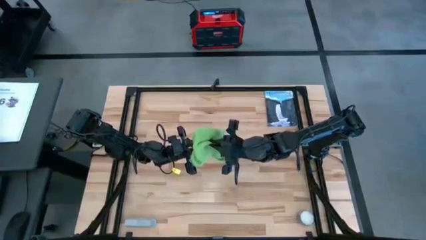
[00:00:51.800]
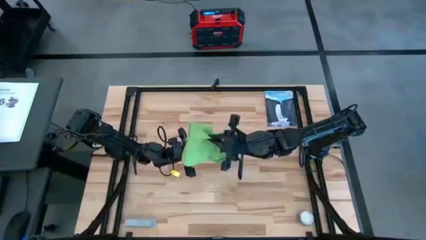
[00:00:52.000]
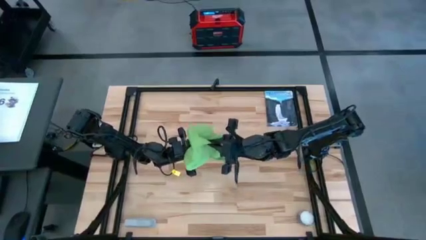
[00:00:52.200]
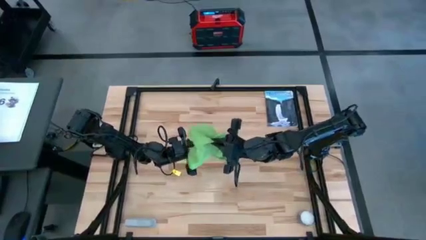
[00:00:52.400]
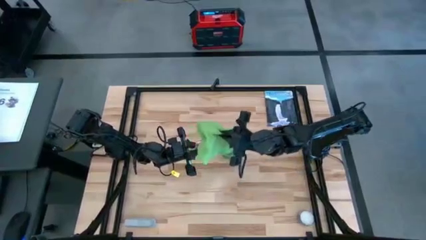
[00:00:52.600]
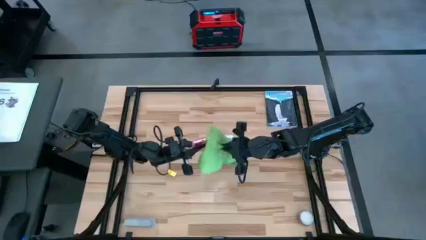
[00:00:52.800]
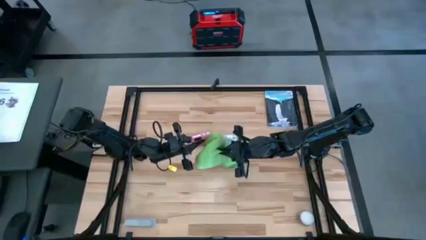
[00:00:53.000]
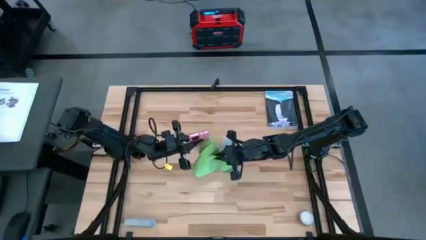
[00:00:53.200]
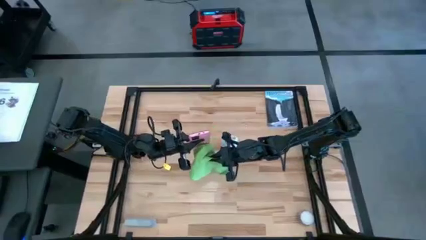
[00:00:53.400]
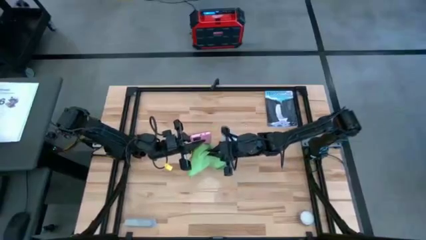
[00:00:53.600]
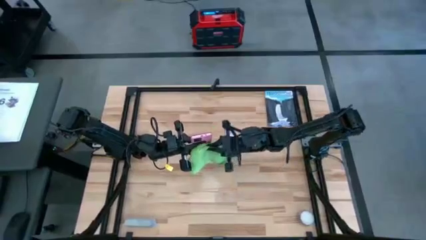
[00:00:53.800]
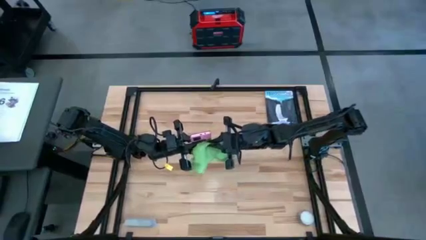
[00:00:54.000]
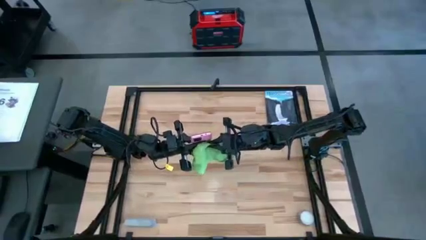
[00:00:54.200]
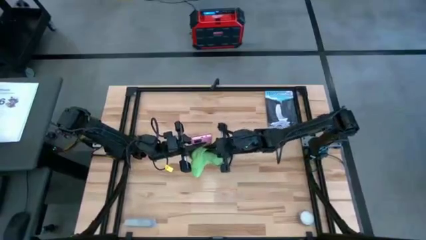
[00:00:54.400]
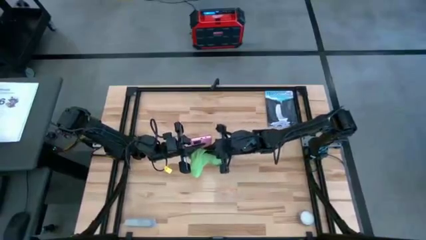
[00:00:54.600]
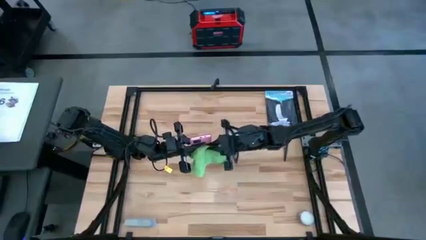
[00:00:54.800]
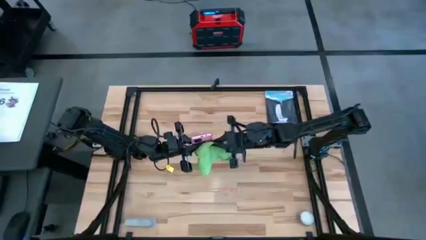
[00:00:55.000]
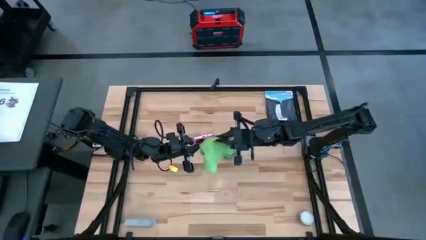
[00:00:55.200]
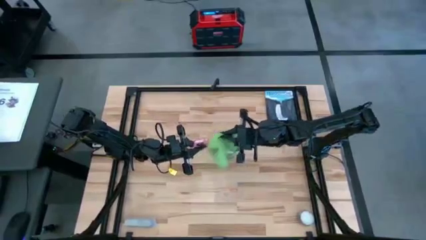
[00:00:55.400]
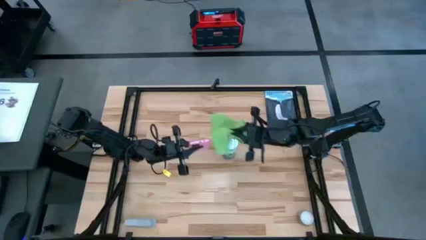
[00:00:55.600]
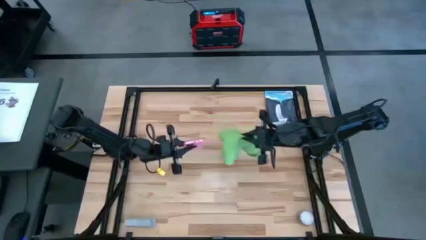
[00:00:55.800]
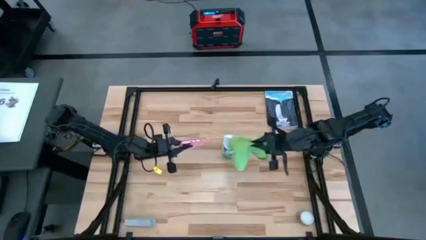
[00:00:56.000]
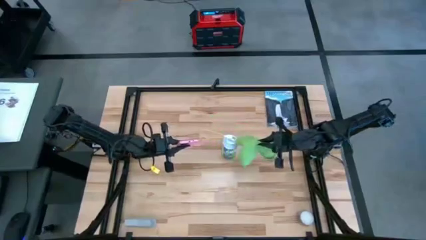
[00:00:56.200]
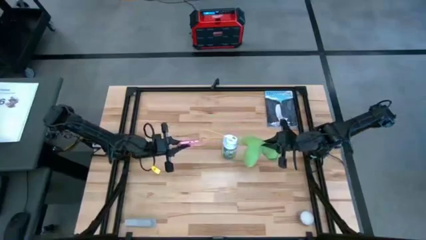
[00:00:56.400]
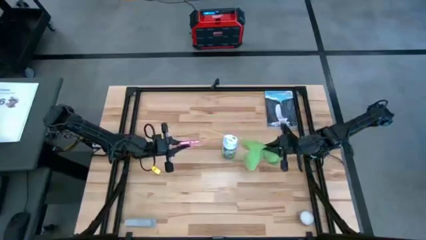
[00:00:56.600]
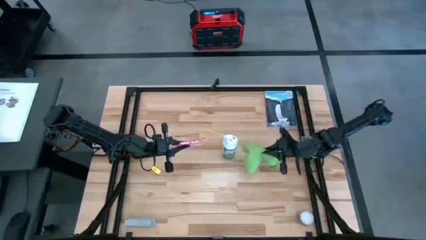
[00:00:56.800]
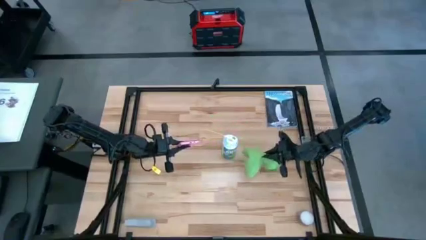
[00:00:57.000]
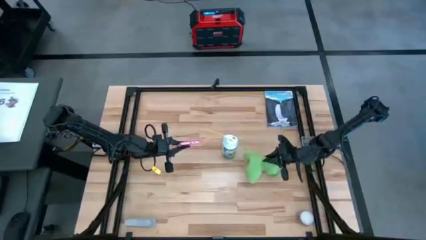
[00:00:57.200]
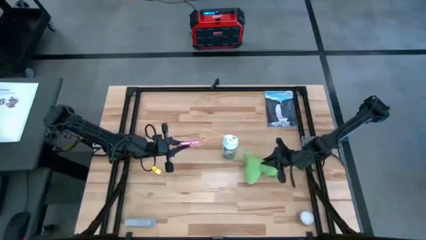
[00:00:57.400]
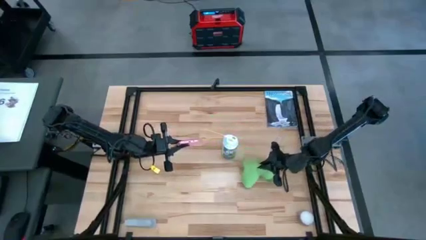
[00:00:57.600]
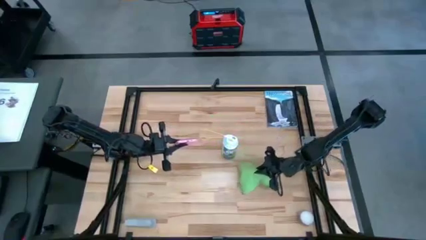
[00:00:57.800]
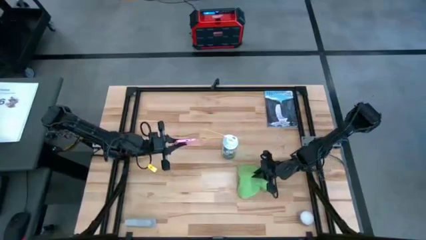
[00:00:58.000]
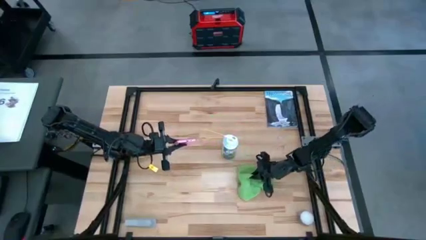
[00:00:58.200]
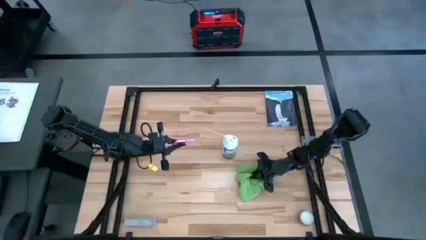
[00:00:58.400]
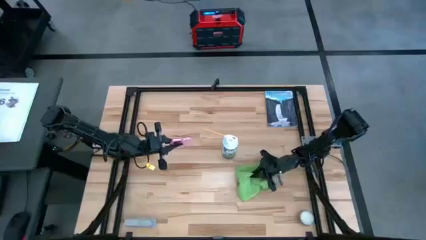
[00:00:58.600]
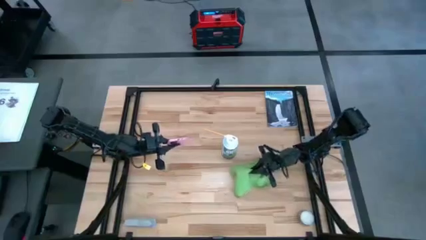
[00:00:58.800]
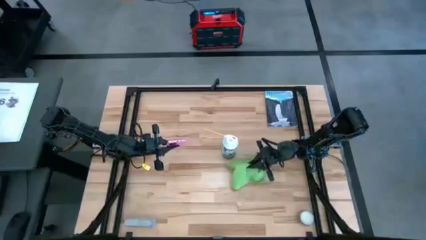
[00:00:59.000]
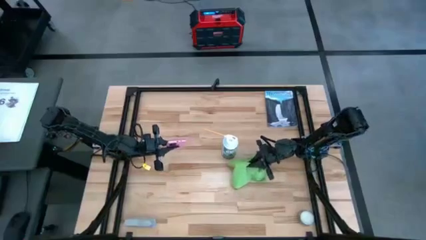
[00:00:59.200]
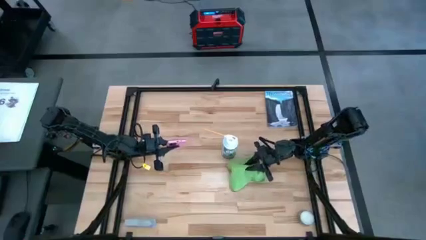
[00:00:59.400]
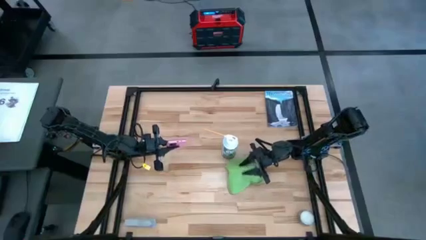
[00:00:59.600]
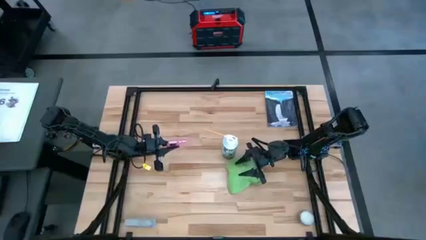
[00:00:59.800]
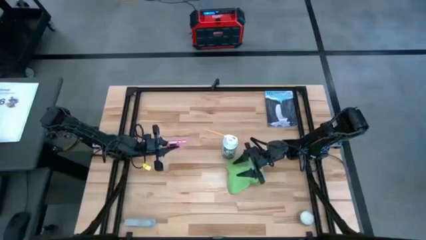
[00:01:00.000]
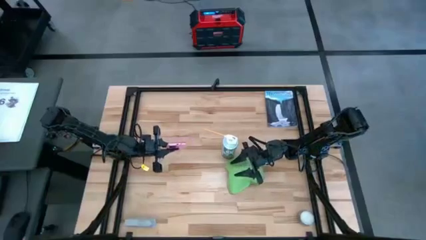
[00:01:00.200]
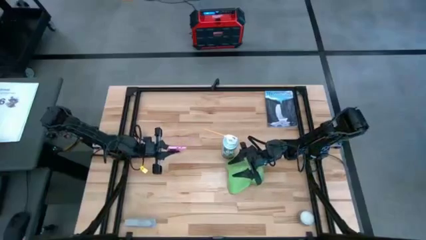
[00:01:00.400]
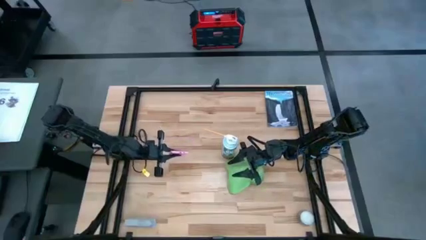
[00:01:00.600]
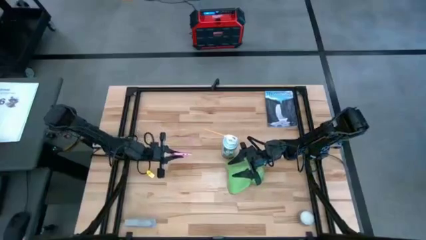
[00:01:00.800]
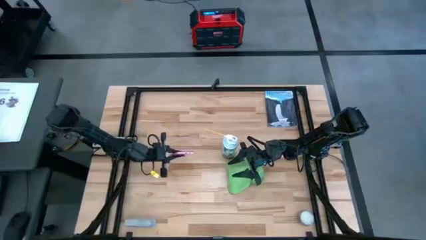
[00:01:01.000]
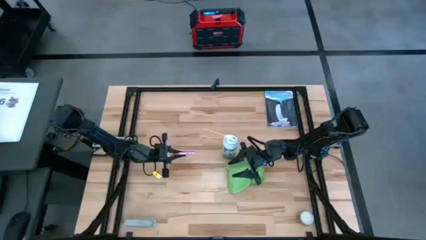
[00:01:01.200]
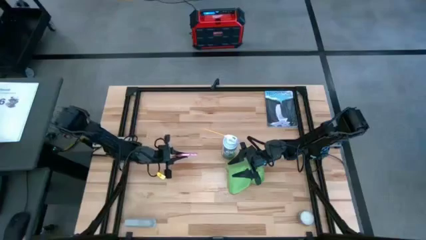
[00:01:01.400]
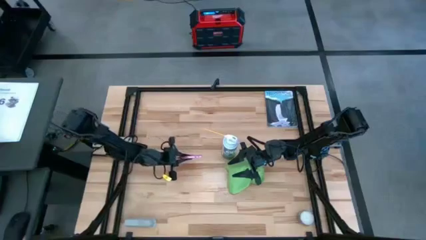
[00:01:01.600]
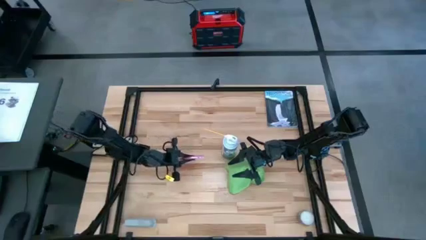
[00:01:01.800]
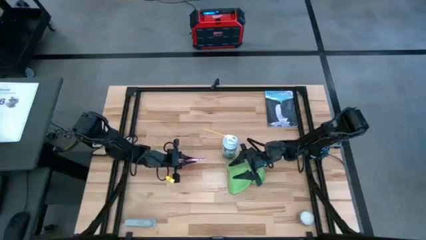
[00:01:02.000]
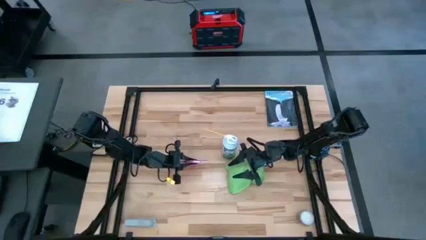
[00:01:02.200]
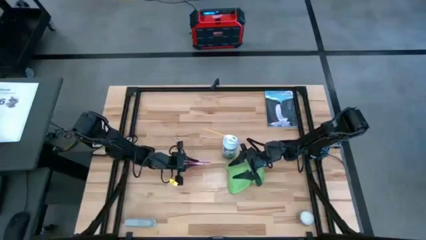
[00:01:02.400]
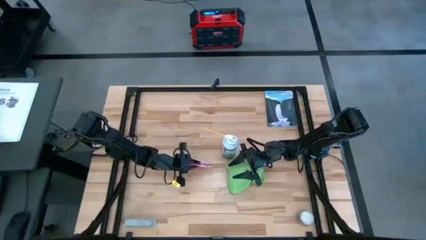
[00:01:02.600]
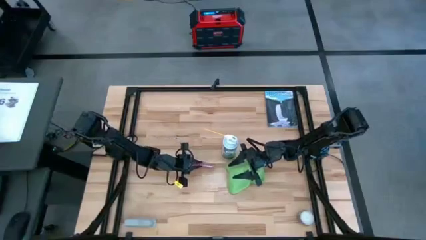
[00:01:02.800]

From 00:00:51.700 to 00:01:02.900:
Task: Apply microfiber cloth
Wipe the back of the pink phone using the green microfiber cloth

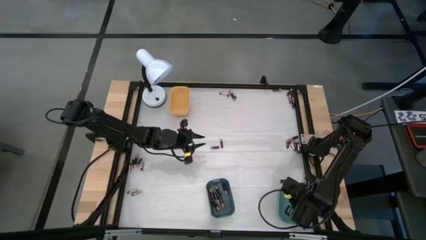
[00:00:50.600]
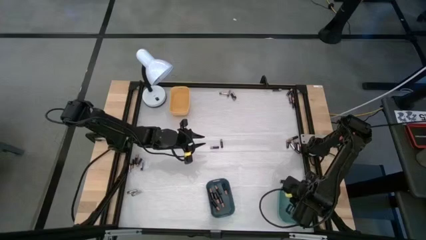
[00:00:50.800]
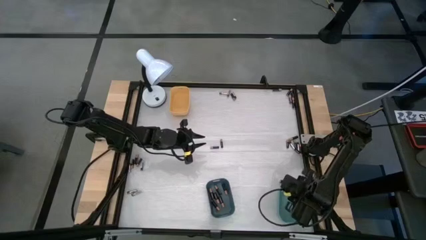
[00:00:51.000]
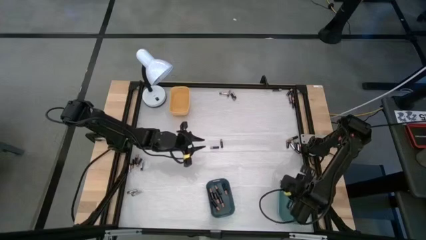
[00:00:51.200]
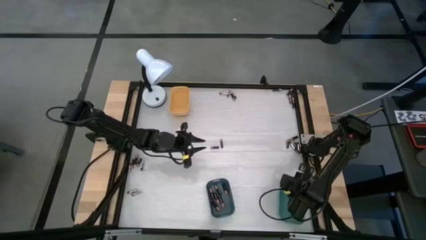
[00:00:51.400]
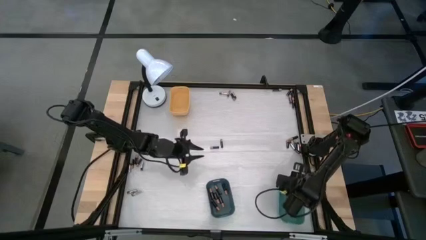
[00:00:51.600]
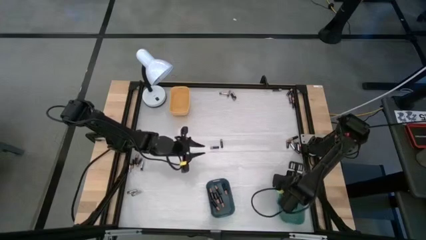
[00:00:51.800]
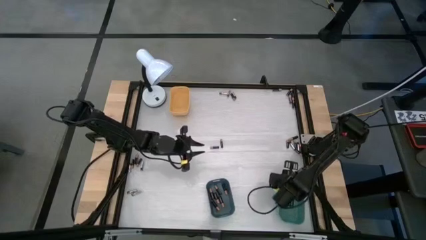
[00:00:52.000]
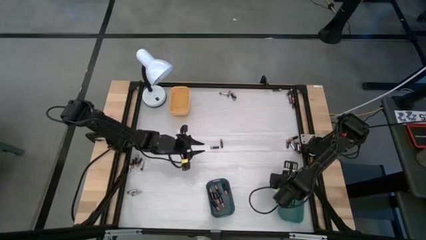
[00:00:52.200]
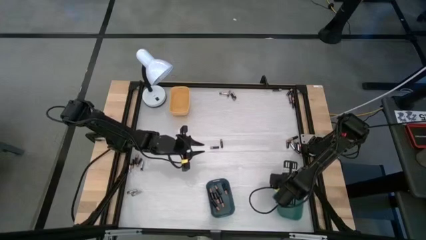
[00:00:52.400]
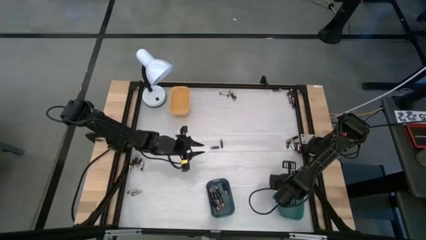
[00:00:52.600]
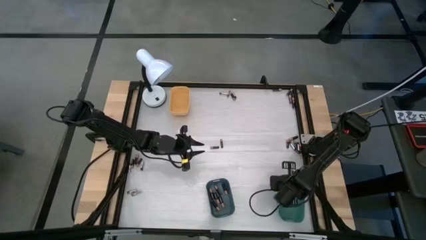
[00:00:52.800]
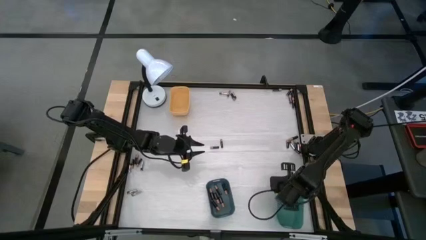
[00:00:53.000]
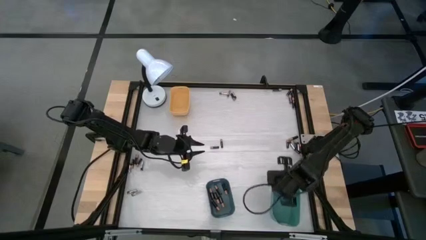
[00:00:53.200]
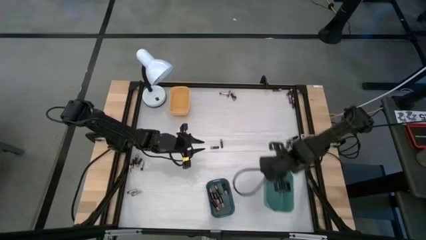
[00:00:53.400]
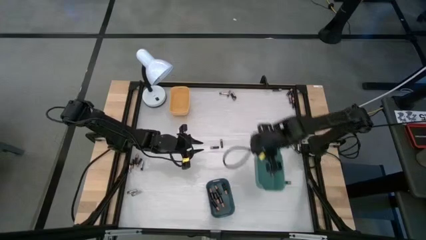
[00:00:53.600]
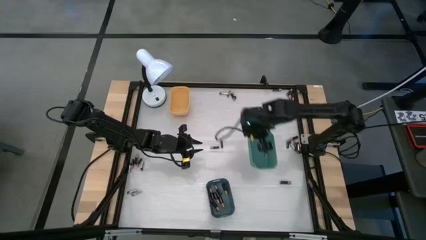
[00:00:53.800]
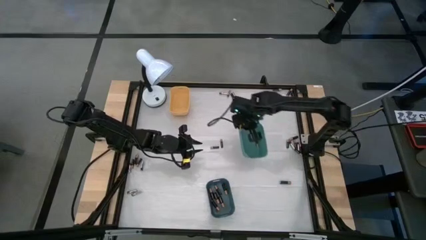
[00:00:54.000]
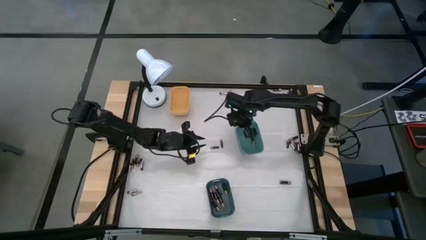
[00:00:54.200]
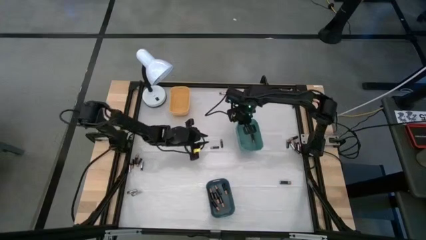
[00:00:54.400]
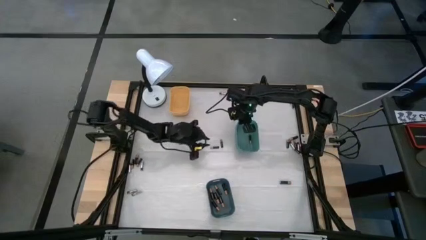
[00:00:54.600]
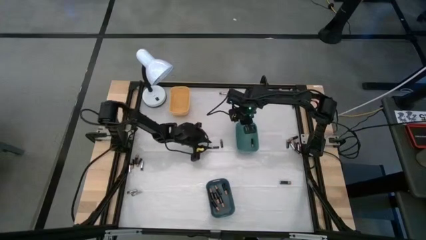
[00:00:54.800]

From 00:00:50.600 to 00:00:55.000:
Task: Sort batteries
Move the green bin to the center of the table

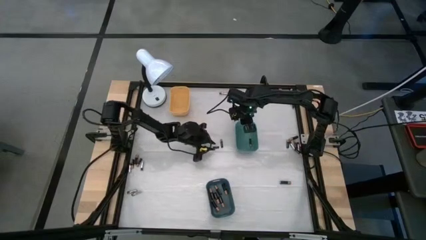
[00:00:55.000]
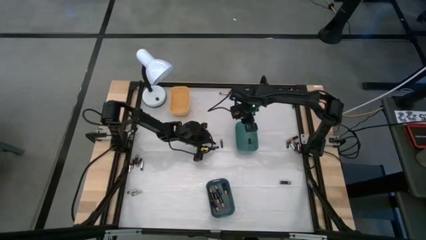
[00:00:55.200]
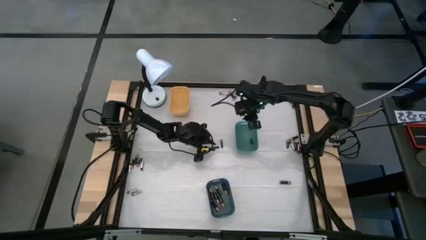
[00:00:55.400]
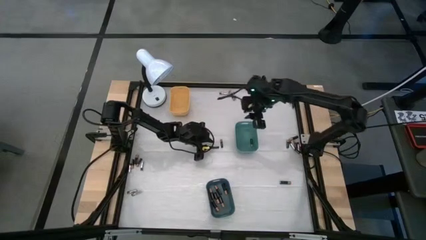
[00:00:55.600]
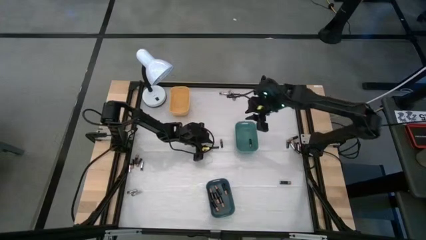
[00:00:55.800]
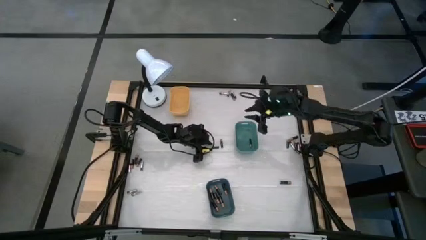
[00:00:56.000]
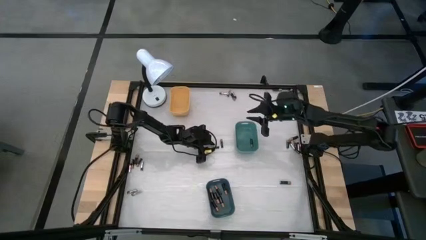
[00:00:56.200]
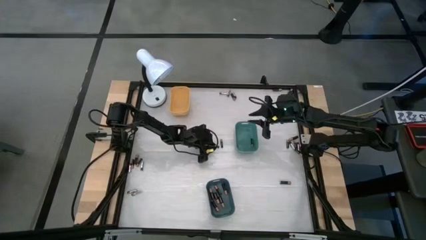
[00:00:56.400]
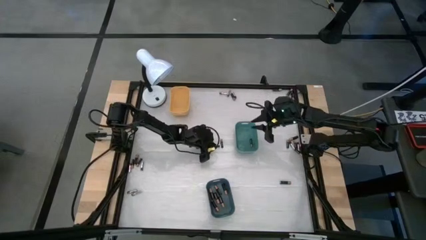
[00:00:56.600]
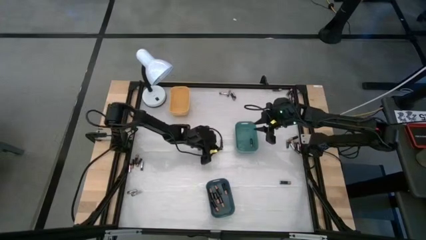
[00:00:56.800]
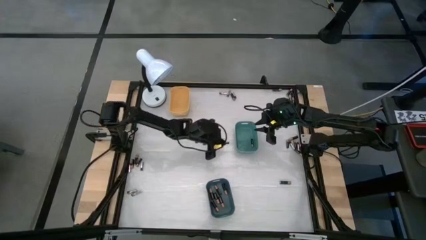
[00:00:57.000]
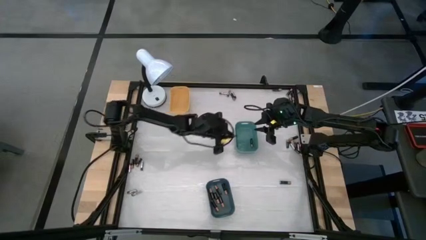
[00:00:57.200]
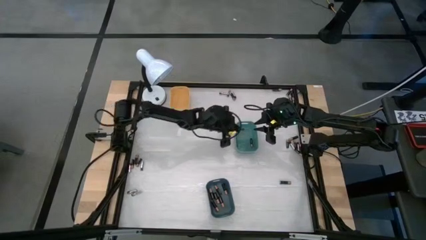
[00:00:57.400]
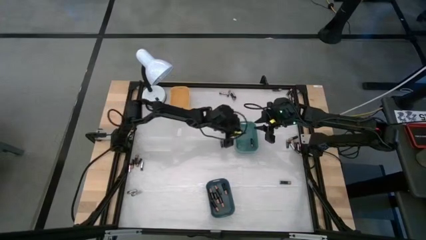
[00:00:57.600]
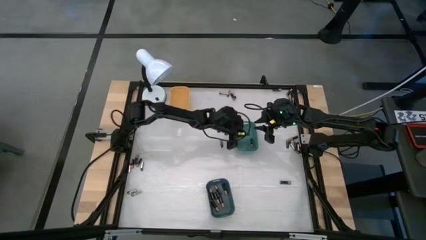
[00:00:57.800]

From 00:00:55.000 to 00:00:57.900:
Put the black battery into the green bin
